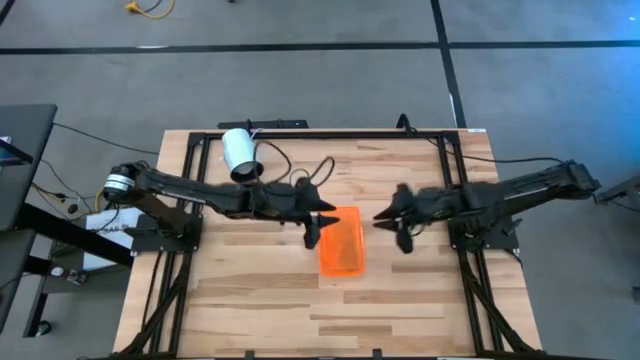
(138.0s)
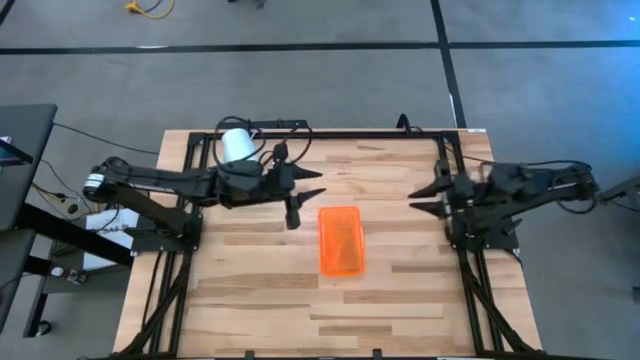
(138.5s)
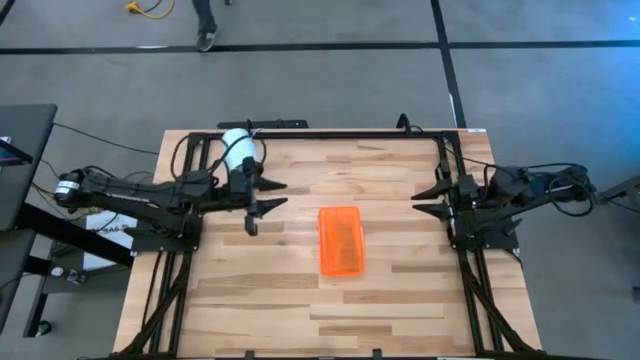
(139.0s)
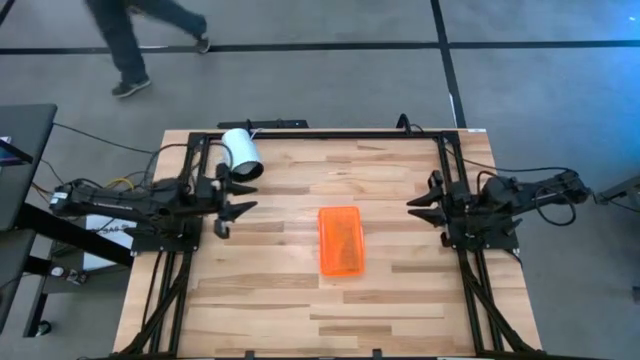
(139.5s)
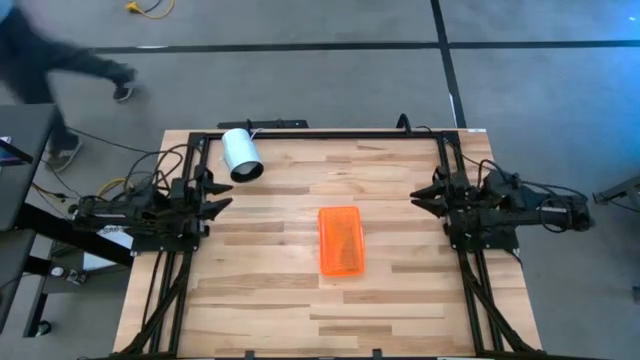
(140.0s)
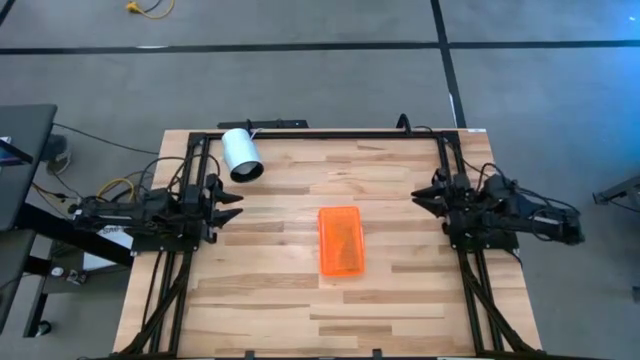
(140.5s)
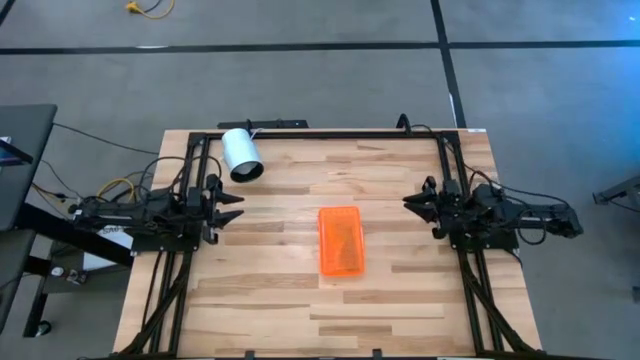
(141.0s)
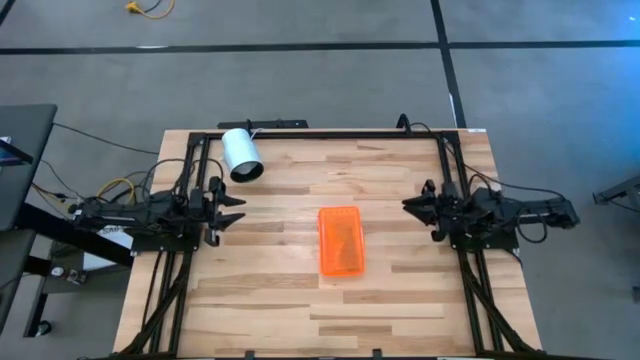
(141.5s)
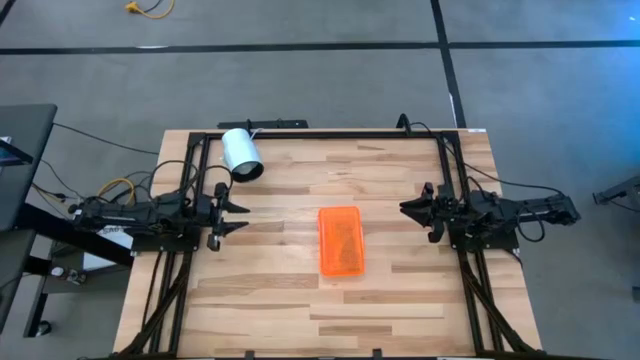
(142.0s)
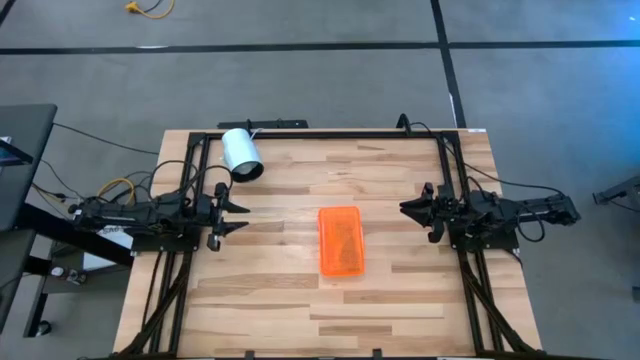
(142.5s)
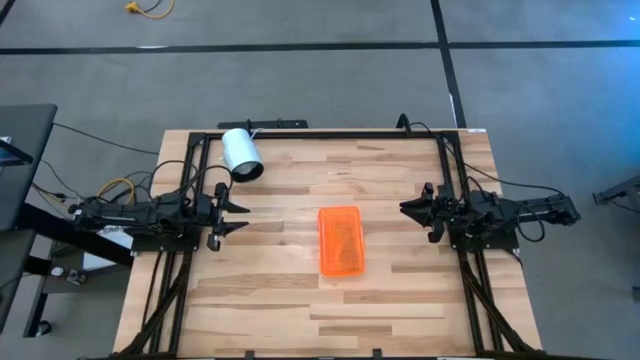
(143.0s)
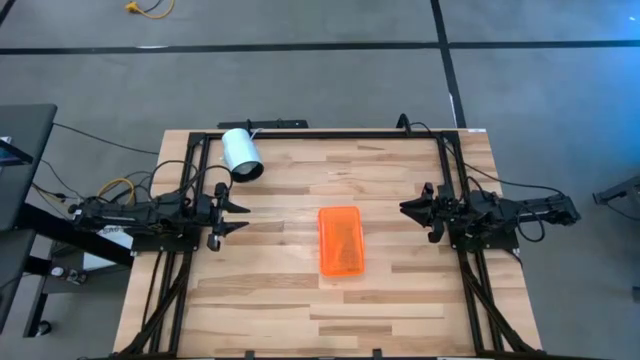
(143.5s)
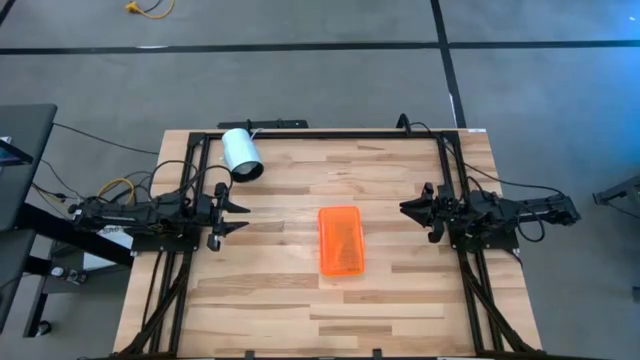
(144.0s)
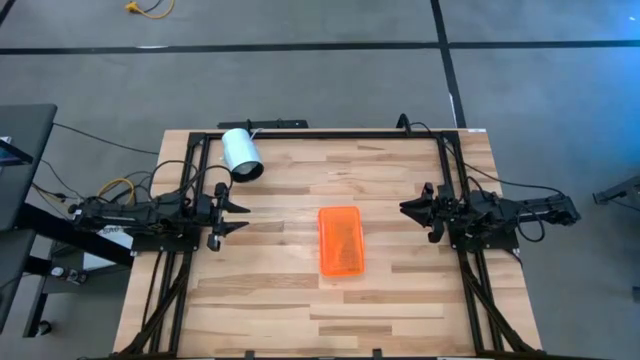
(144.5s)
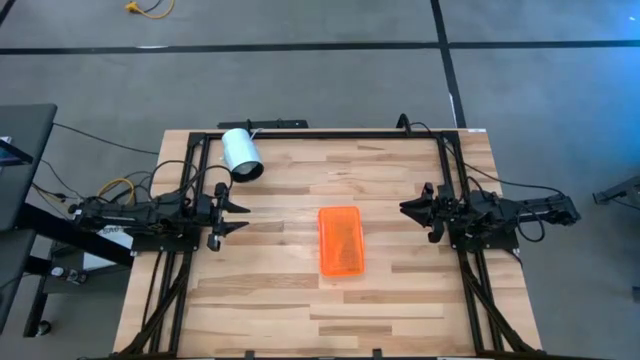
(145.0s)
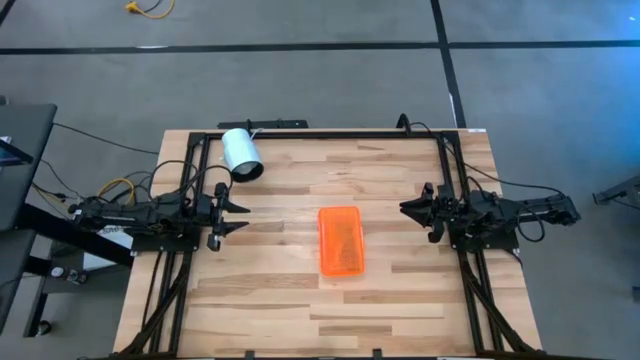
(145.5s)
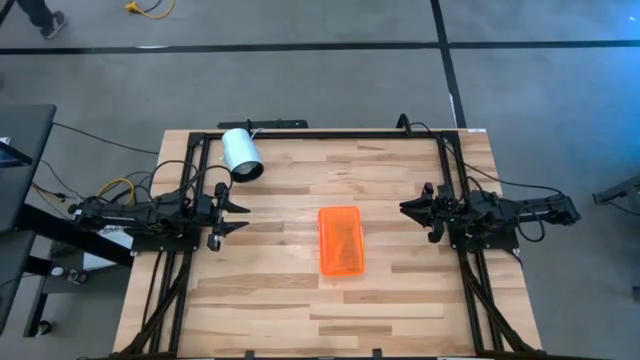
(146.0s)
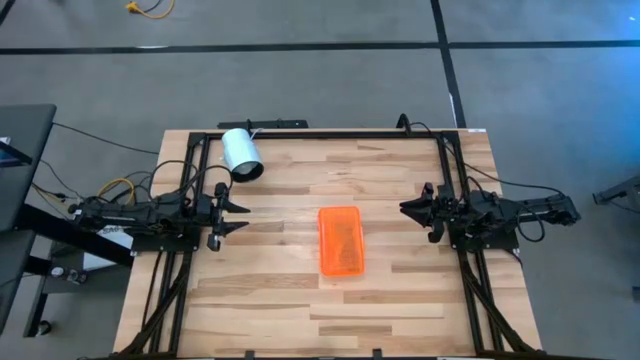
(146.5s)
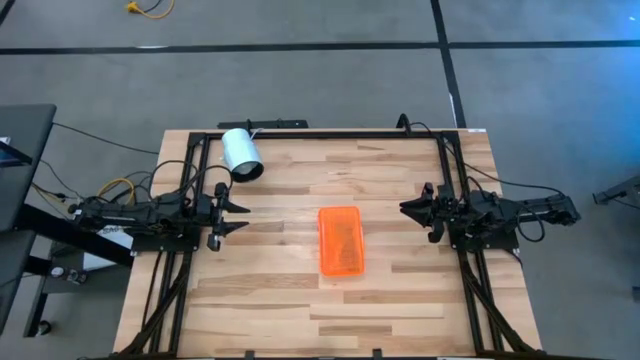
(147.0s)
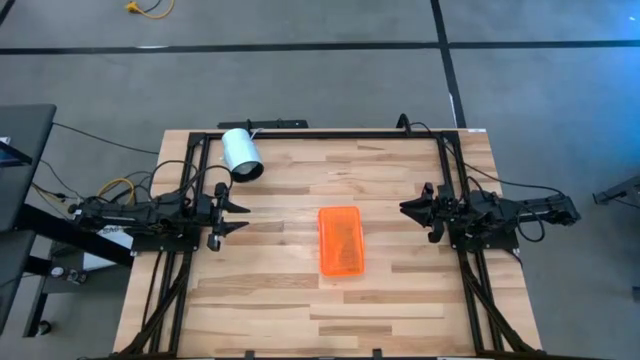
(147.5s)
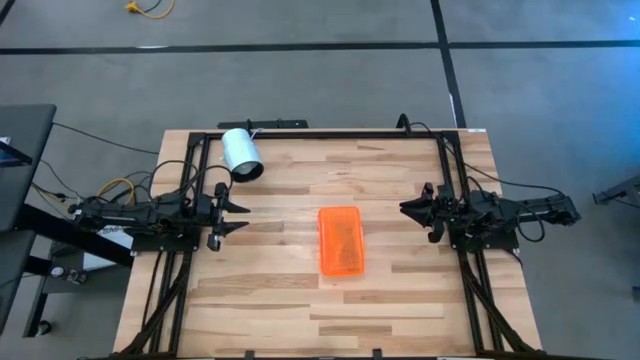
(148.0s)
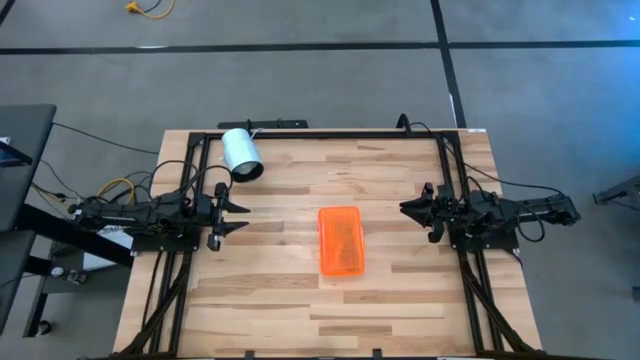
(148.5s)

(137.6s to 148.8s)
Task: Pick & place school supplies into a supply box
Return to Home Position

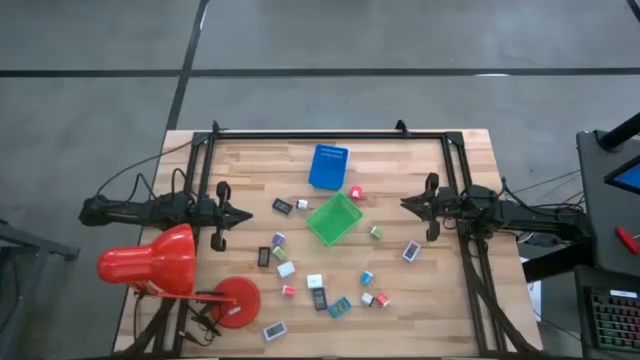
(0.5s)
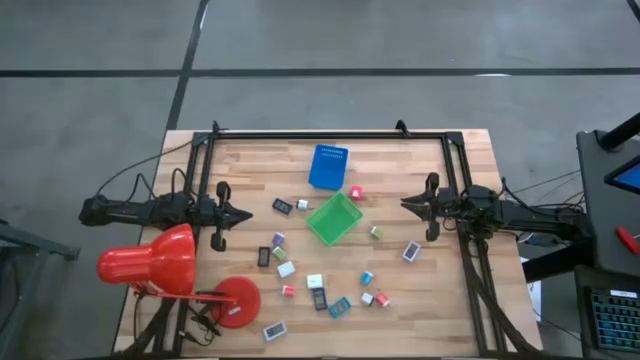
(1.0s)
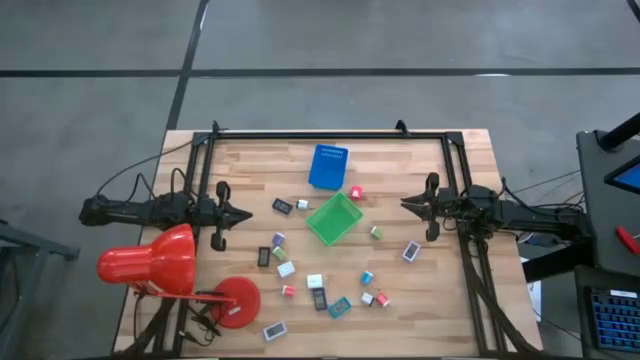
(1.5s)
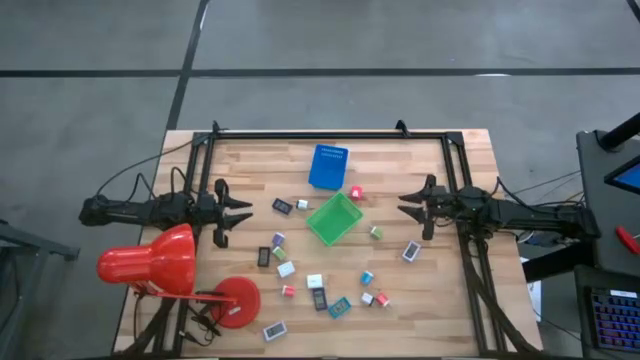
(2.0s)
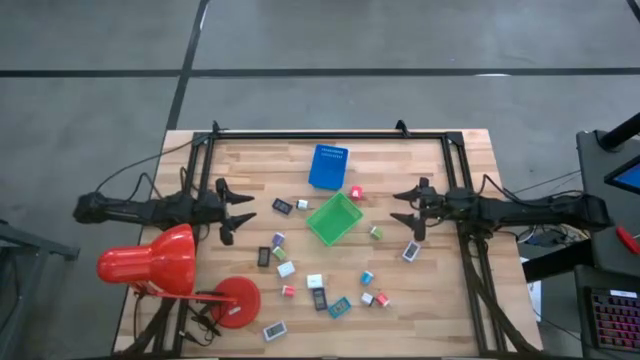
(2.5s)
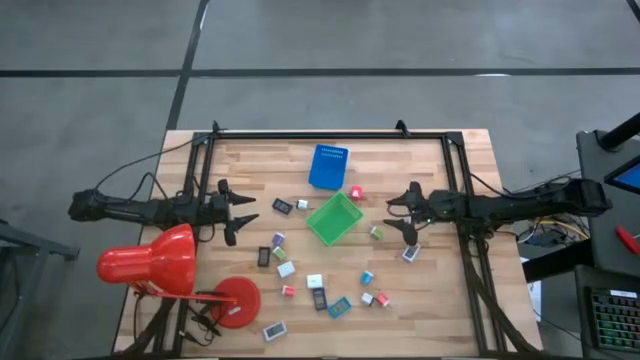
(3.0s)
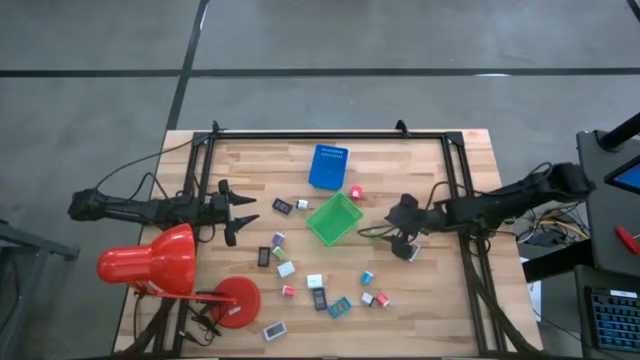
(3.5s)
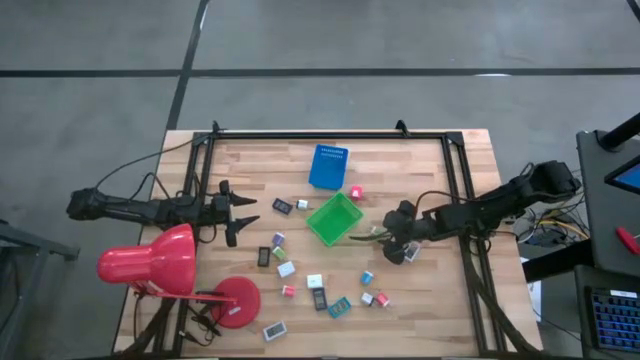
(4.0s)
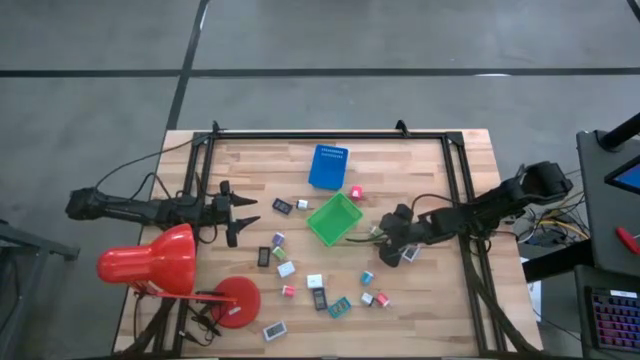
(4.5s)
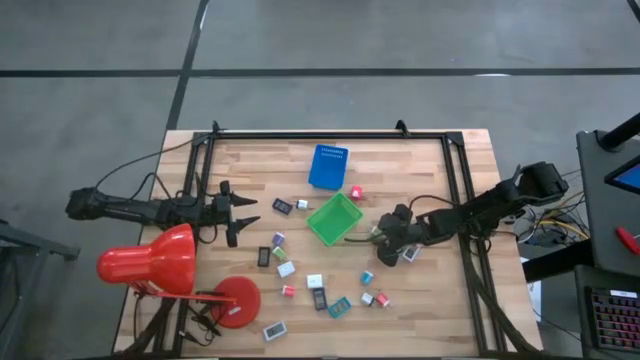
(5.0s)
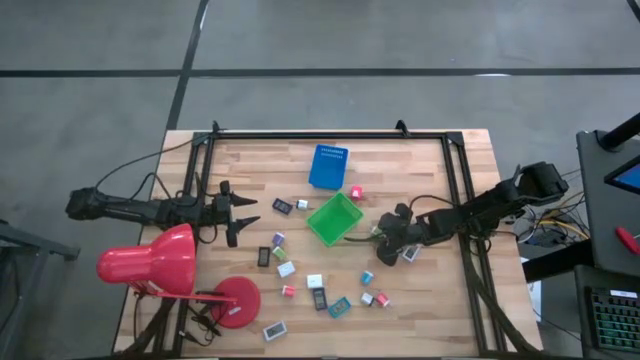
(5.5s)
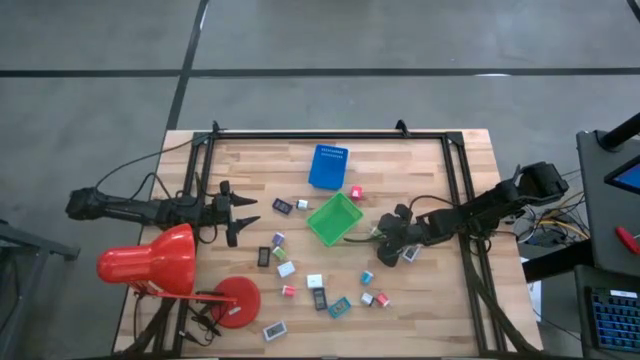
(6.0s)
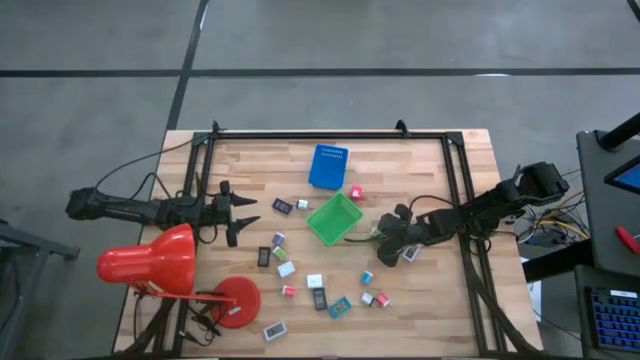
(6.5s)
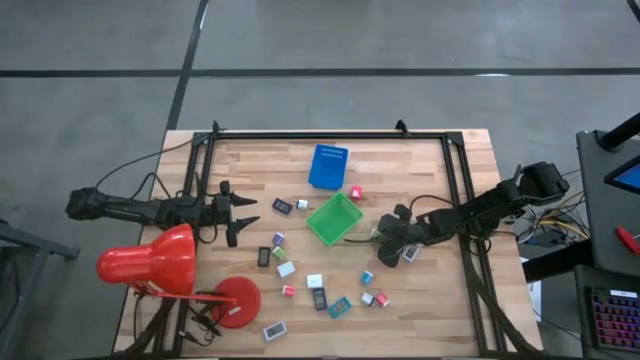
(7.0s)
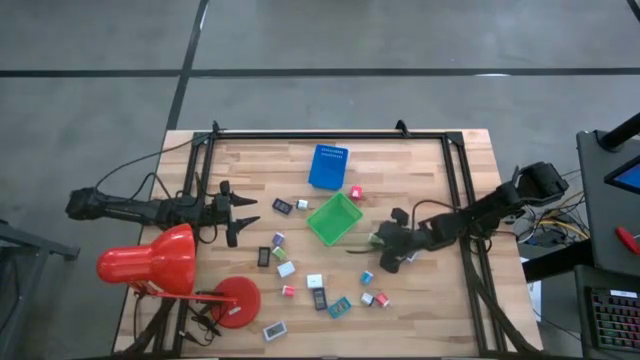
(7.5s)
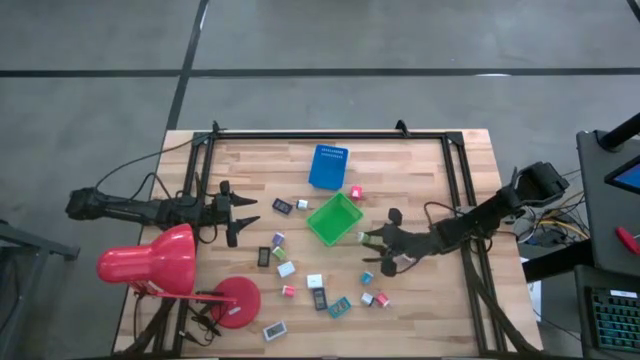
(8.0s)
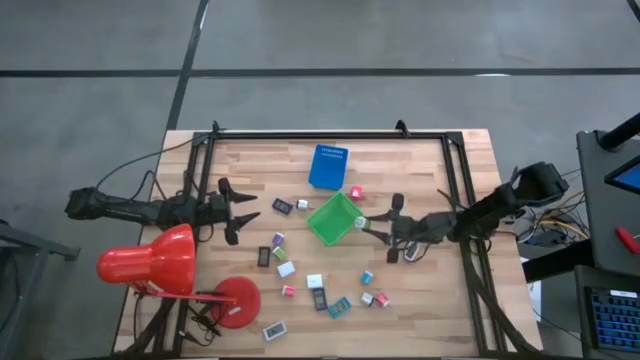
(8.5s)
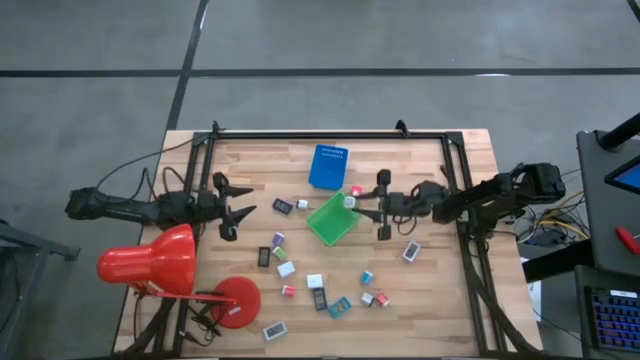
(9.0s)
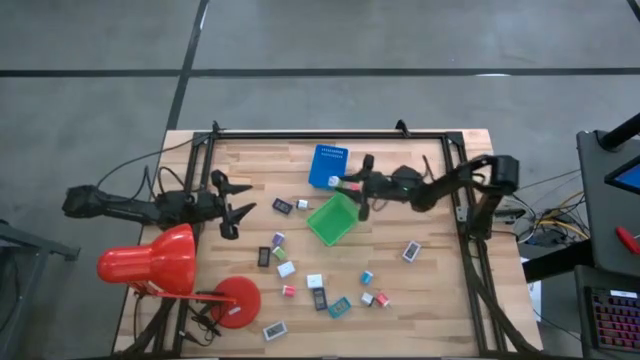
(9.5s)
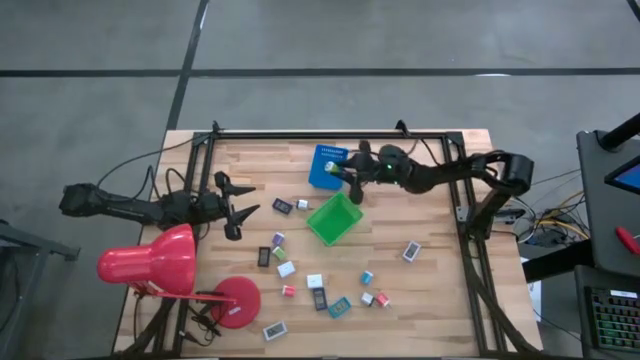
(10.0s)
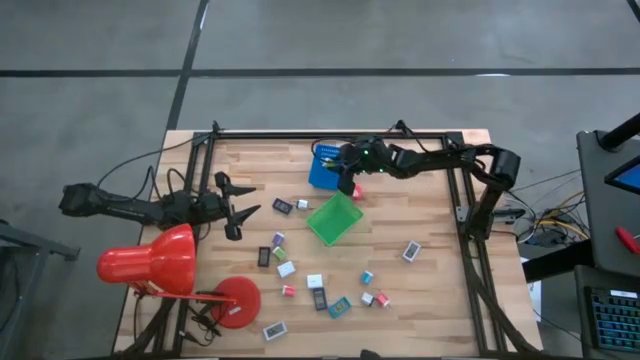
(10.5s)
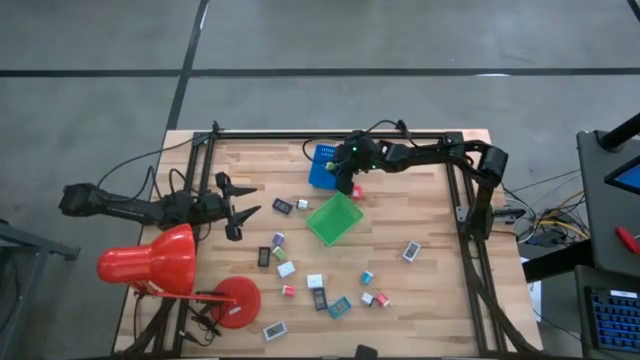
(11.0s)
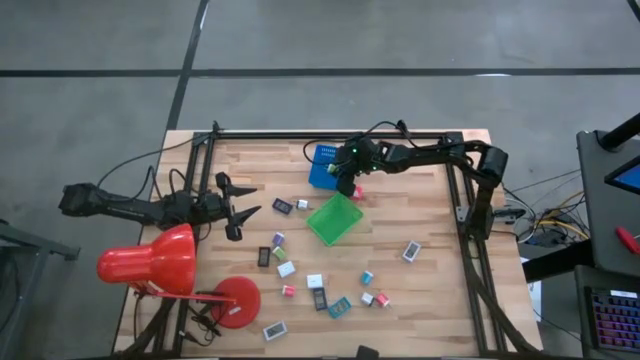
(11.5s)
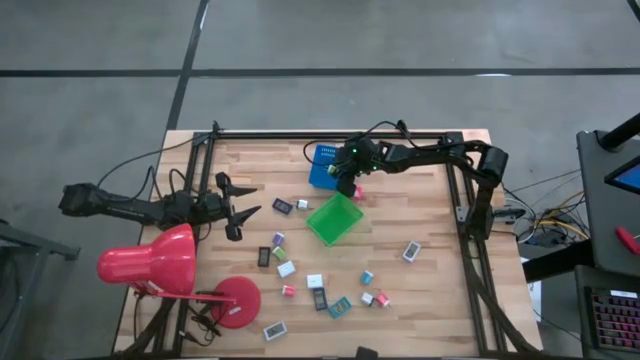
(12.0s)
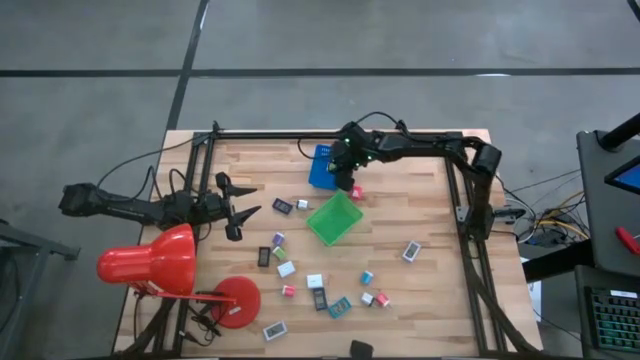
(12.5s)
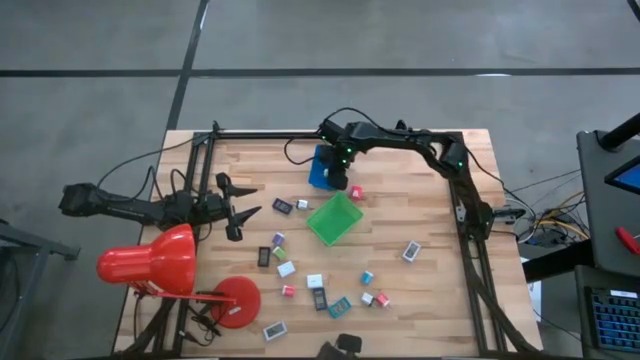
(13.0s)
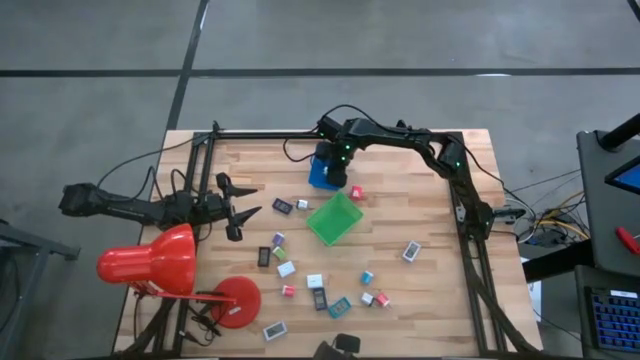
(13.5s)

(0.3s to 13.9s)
Task: Pick & Place Office items
Put the right small green charger adapter into the blue bin
